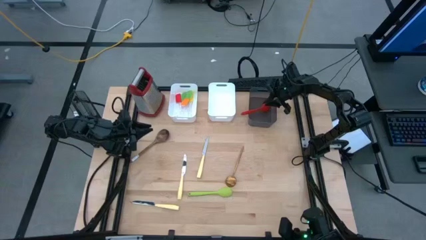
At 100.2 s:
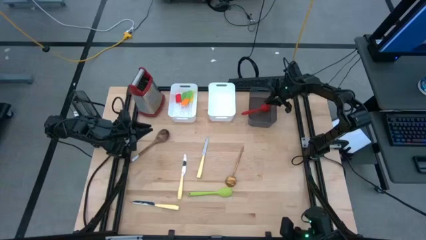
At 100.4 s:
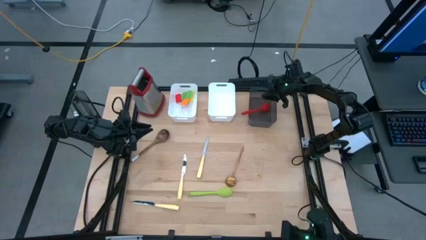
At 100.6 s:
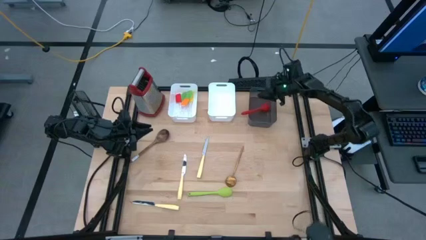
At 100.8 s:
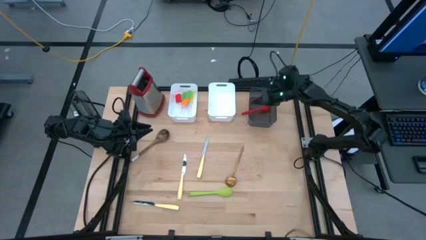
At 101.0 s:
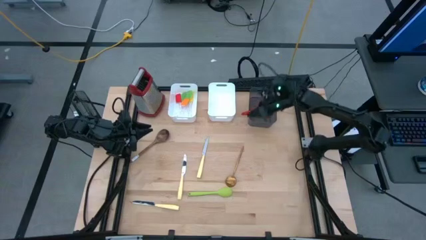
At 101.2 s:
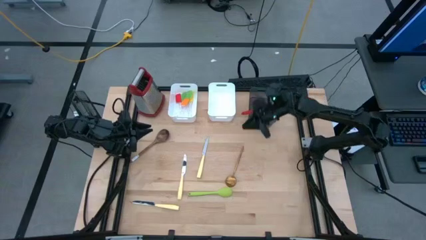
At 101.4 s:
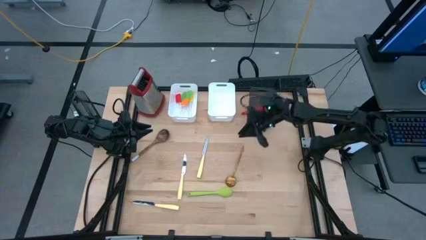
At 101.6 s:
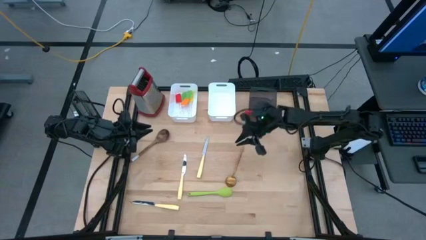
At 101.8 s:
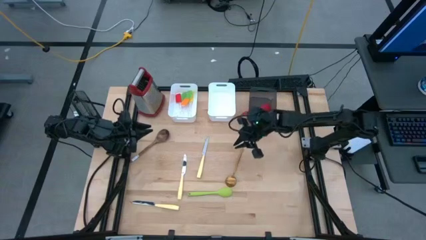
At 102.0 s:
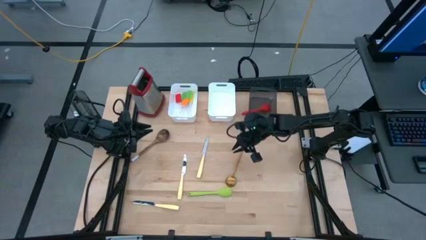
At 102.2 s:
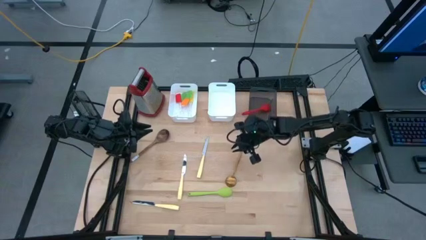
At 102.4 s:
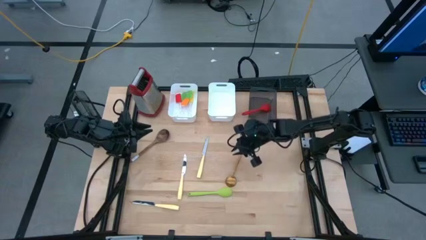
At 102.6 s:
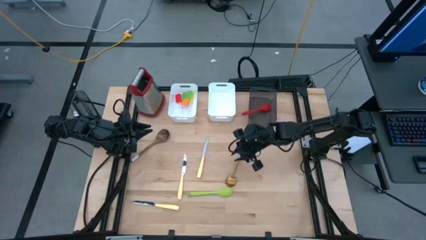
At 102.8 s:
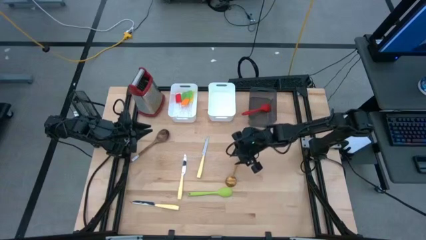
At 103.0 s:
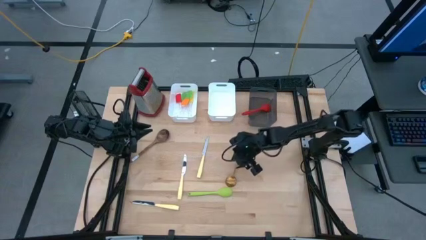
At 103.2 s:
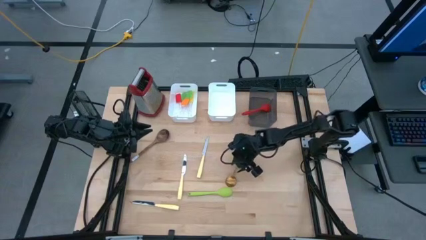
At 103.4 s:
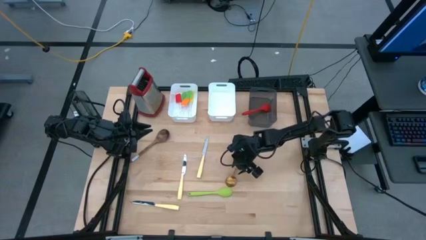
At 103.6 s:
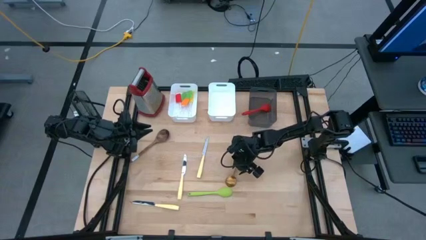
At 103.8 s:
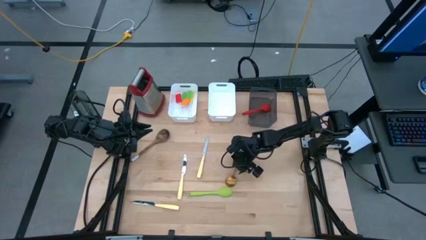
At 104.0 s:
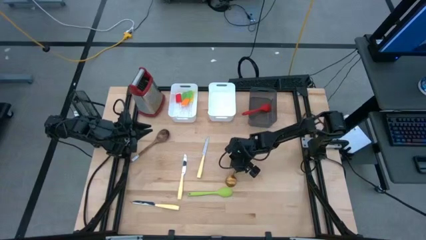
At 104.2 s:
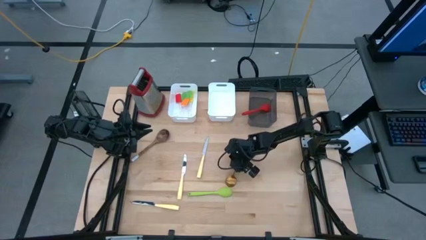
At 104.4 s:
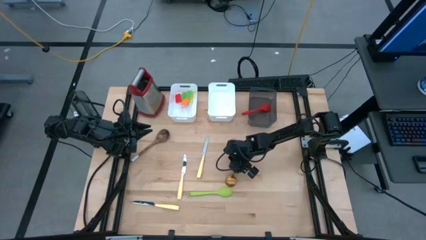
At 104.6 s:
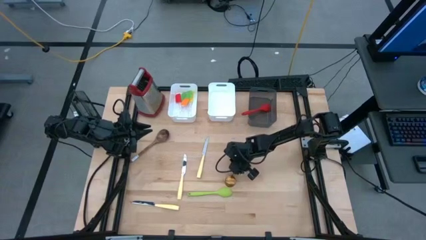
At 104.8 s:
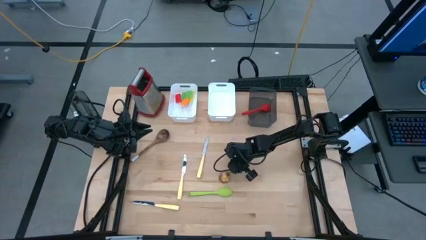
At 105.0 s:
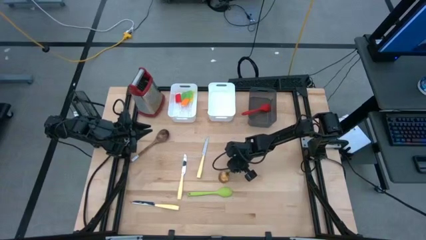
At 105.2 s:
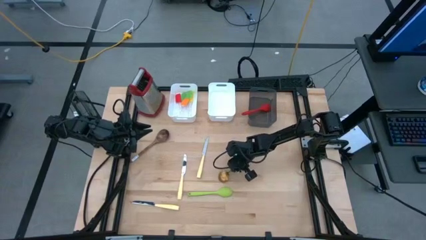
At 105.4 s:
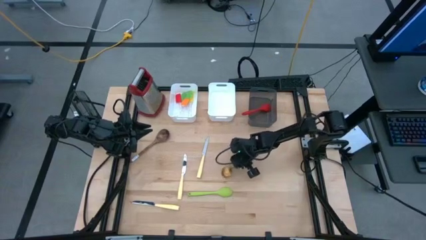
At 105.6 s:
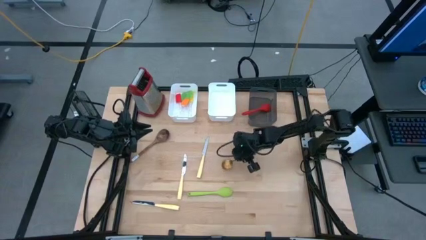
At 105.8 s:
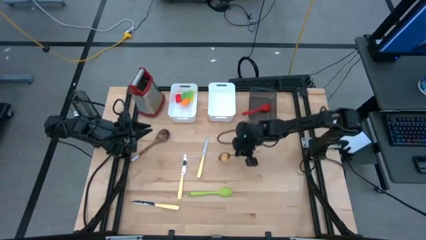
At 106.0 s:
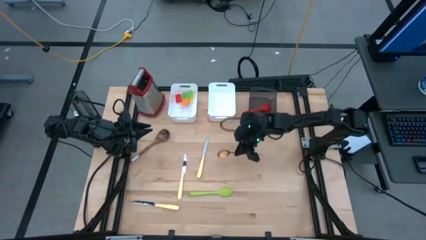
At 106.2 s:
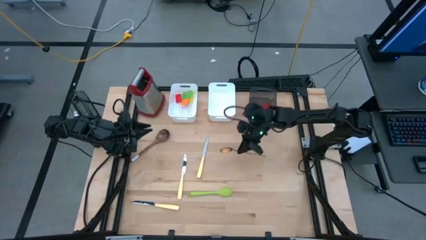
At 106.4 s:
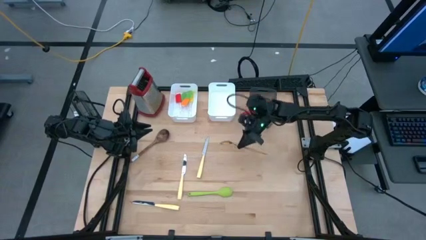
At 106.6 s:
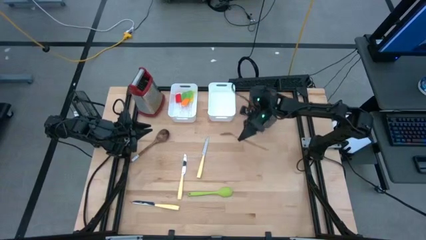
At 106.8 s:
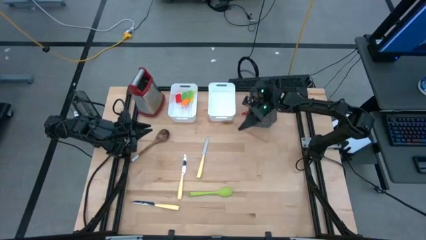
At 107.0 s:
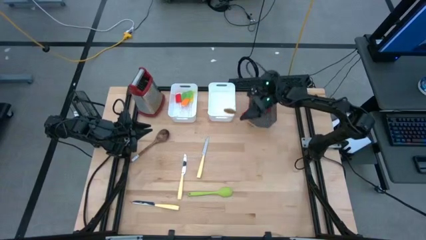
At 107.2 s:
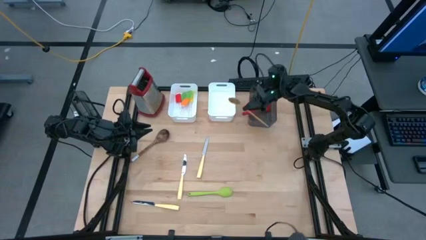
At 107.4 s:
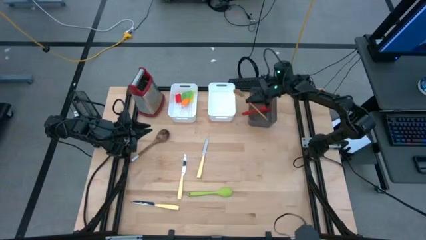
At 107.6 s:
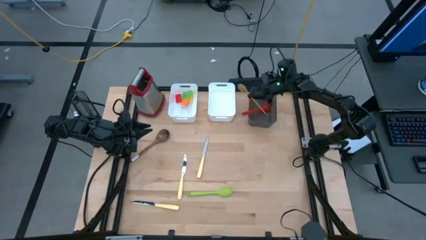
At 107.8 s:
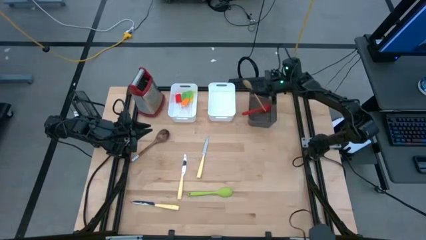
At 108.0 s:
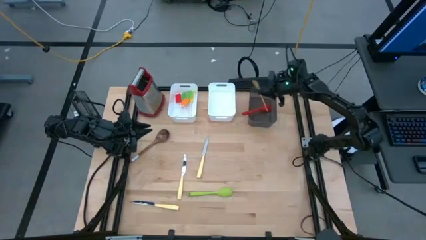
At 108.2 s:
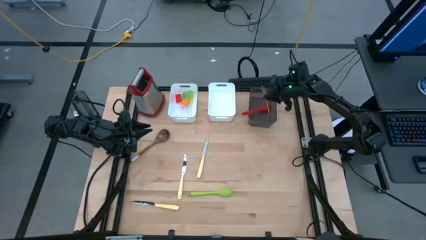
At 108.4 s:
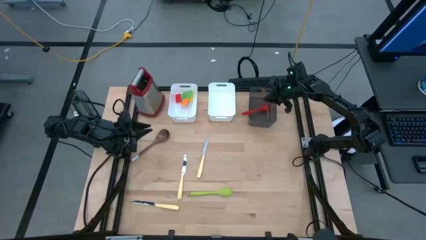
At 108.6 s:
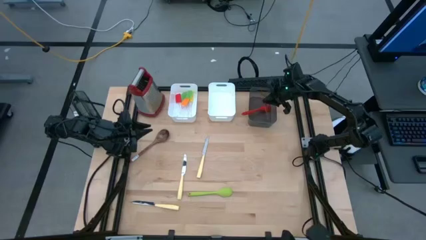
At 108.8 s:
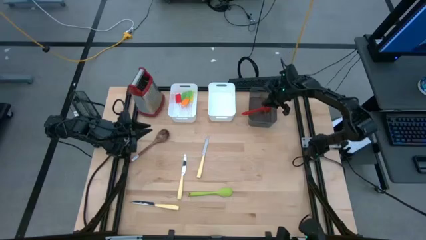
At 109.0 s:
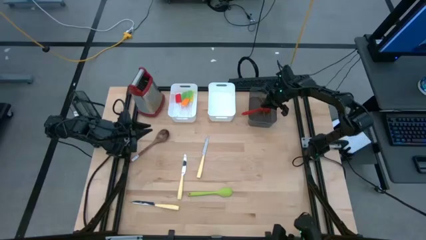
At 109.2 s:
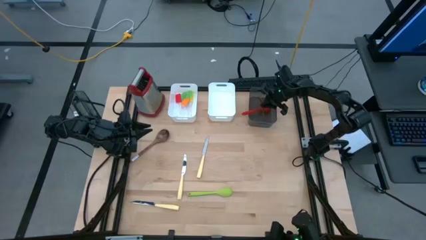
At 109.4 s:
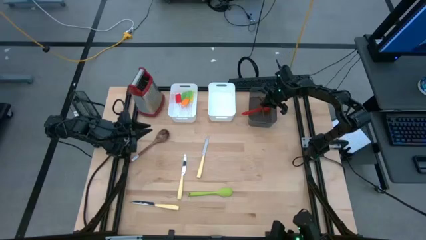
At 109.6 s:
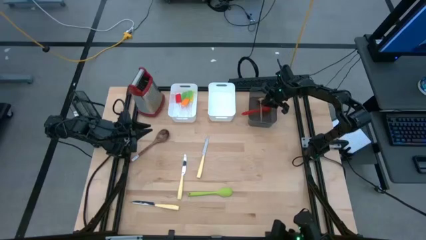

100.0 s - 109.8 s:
Task: Pick & Place Kitchen Items
Put the yellow serving spoon into the black bin

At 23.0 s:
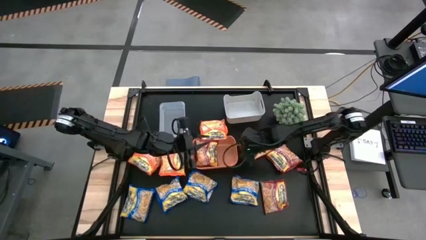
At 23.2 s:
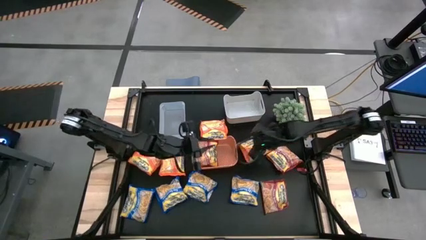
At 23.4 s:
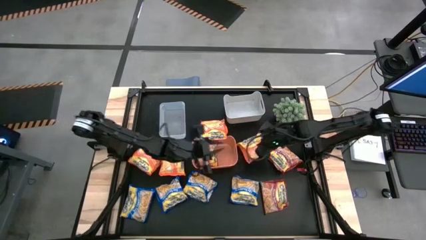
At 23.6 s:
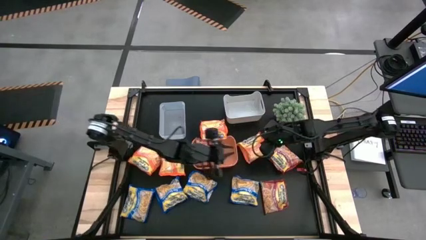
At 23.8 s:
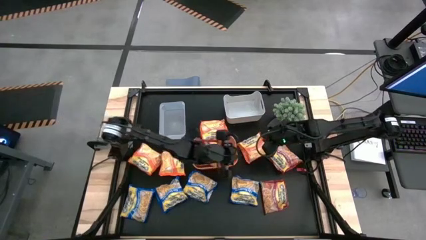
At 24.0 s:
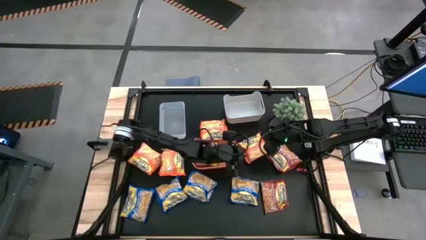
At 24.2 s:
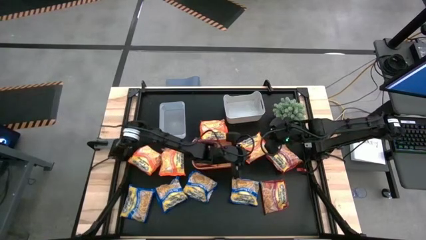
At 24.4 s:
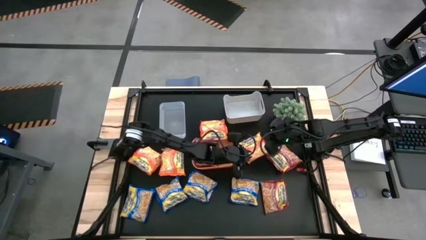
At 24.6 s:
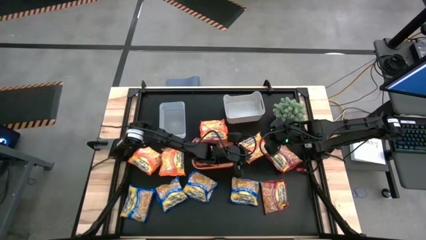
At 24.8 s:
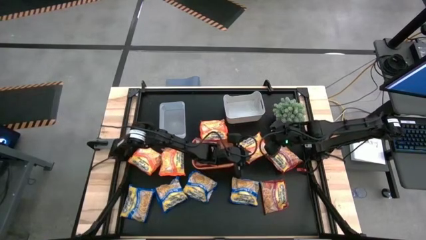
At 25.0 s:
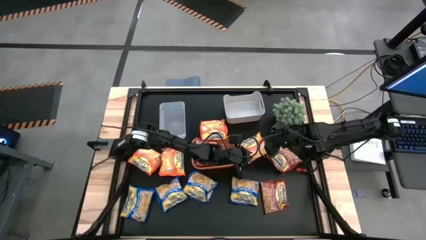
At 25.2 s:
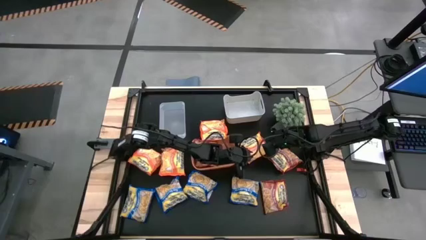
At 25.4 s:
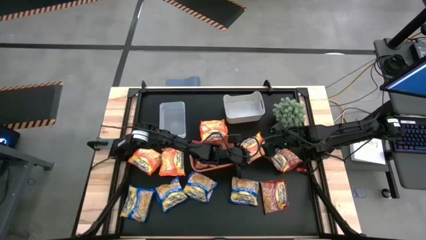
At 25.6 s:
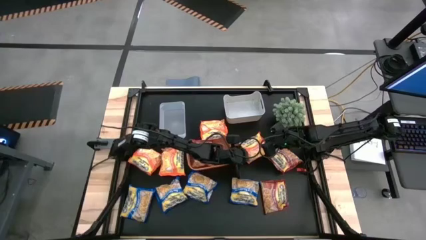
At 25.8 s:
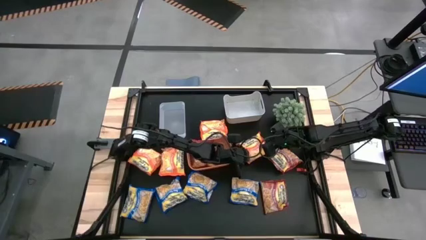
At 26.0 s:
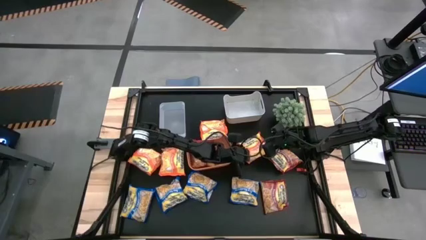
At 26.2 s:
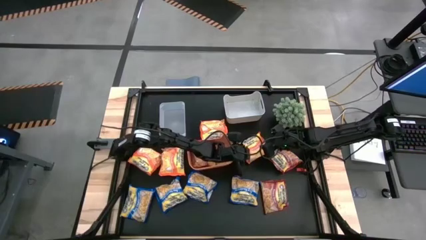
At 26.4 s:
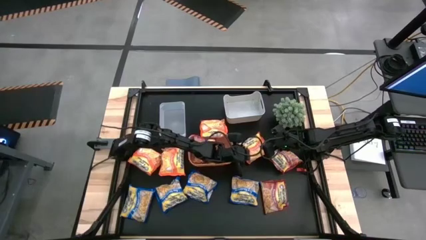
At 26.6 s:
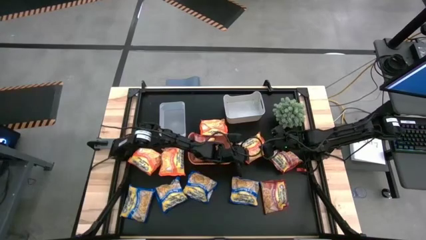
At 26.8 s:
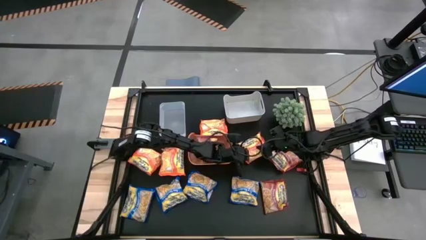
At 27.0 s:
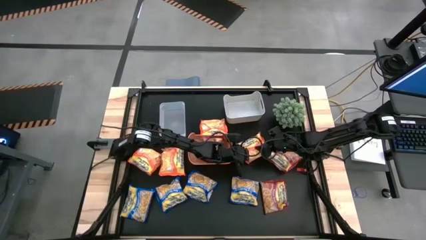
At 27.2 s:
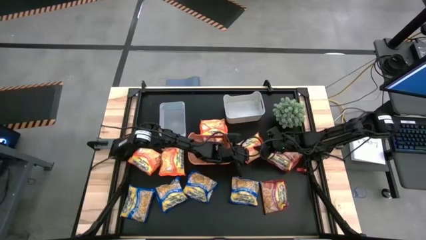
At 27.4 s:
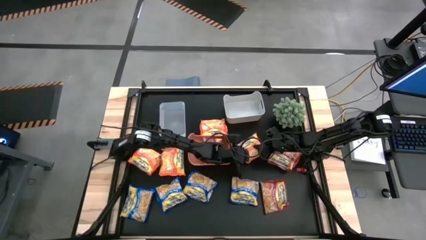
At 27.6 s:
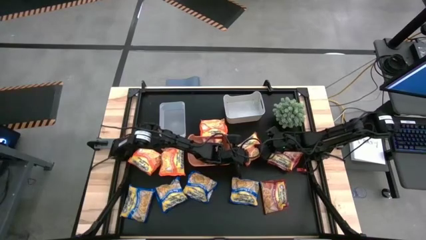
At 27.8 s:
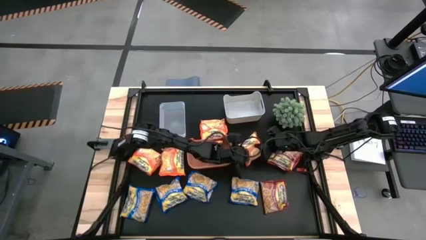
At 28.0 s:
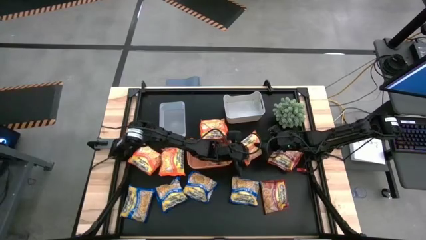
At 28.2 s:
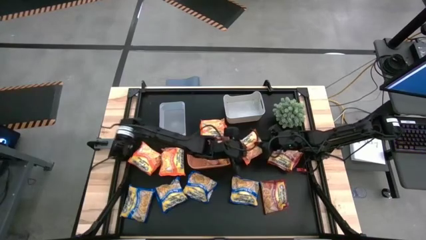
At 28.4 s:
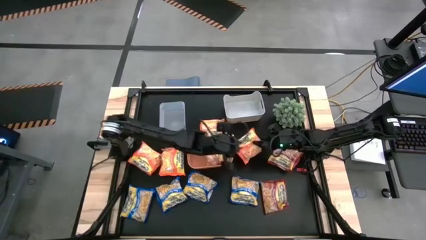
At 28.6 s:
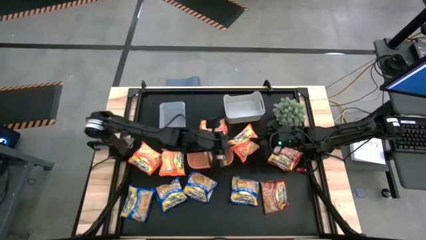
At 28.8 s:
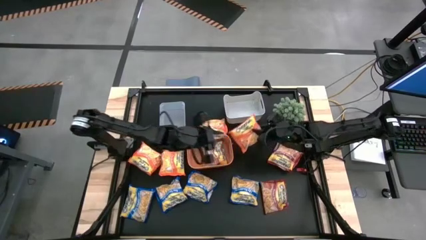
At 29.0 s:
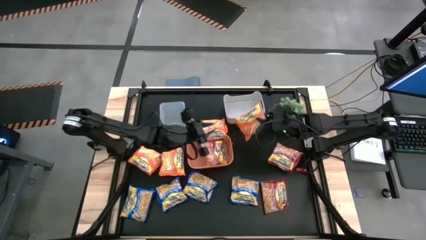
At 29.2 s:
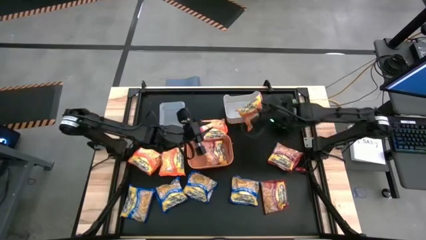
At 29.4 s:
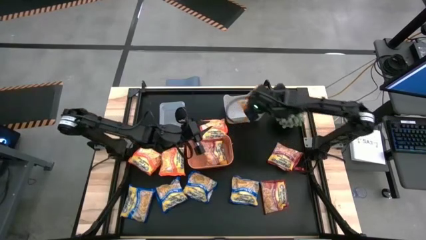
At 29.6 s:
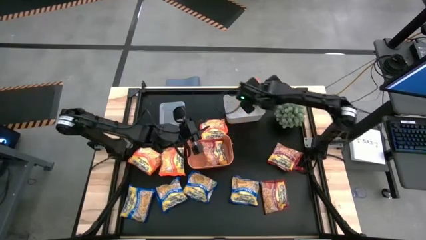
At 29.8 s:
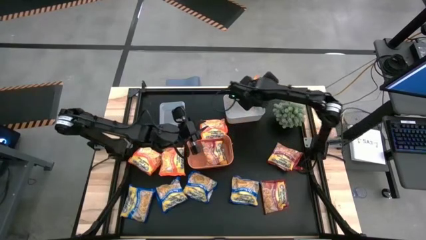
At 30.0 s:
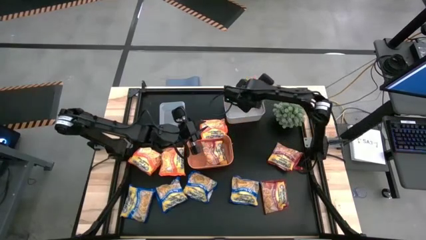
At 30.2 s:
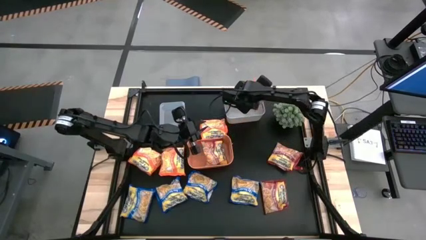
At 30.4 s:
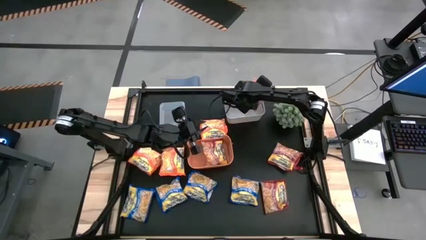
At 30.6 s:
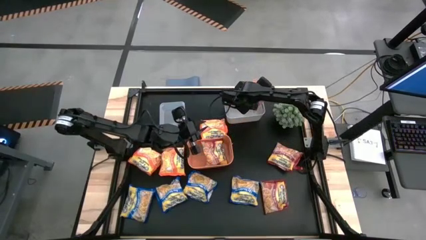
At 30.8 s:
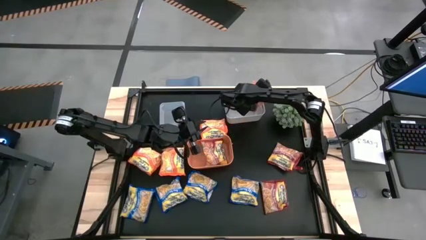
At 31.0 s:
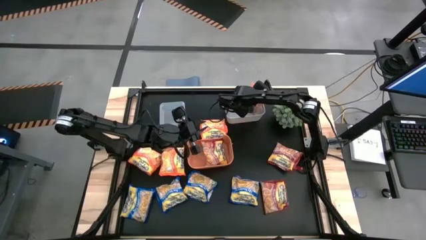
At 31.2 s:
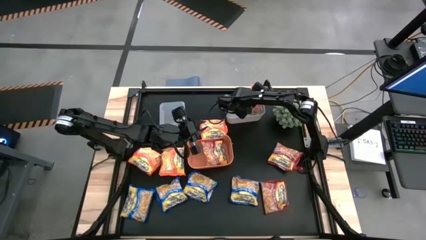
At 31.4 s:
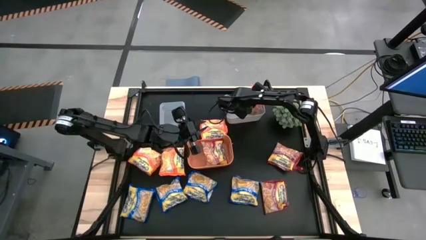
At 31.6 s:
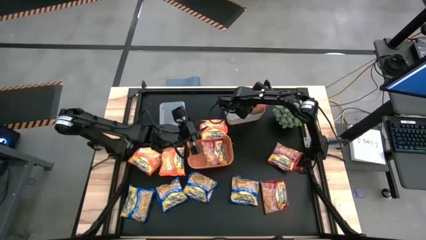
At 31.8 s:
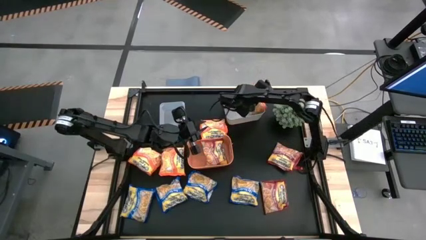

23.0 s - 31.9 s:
Task: Sort Maruchan noodles
Put the orange noodle packet into the white bin
